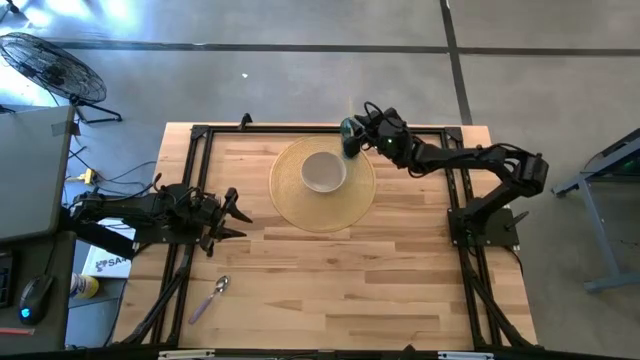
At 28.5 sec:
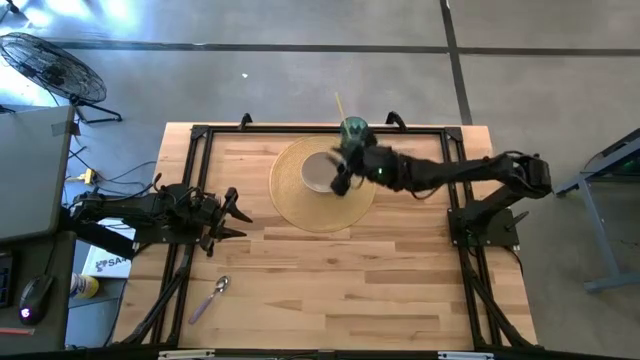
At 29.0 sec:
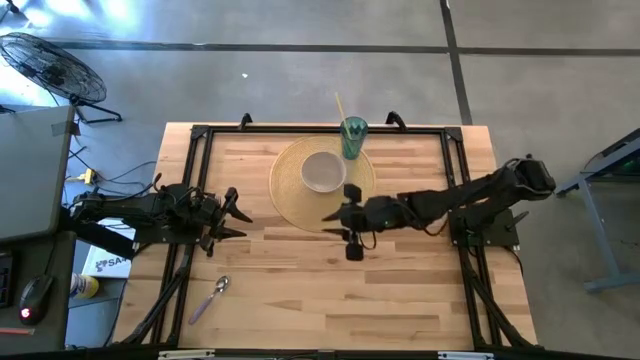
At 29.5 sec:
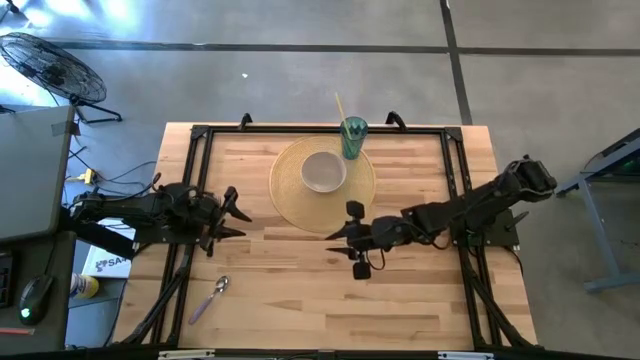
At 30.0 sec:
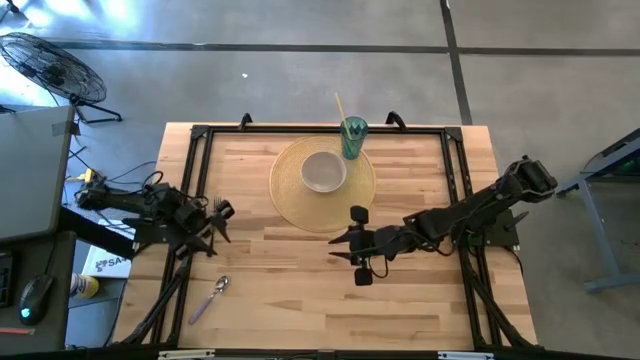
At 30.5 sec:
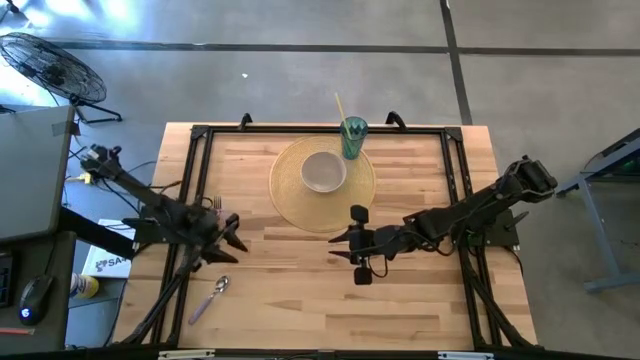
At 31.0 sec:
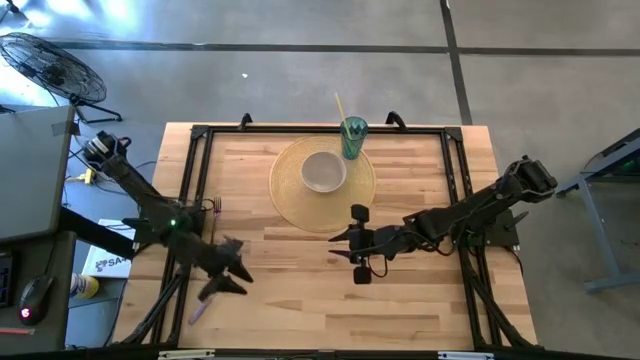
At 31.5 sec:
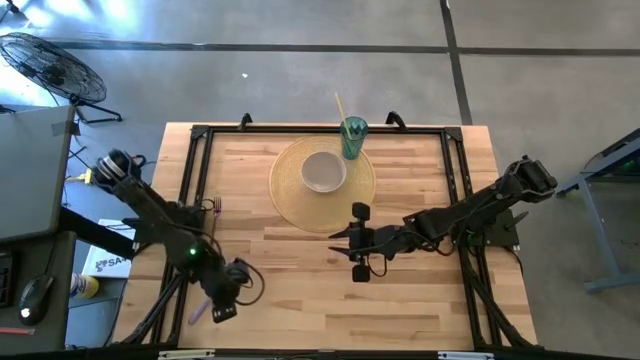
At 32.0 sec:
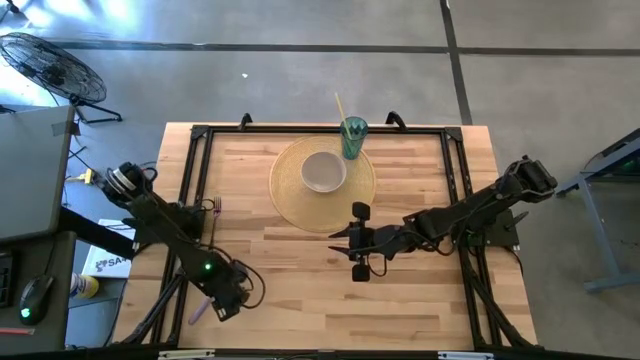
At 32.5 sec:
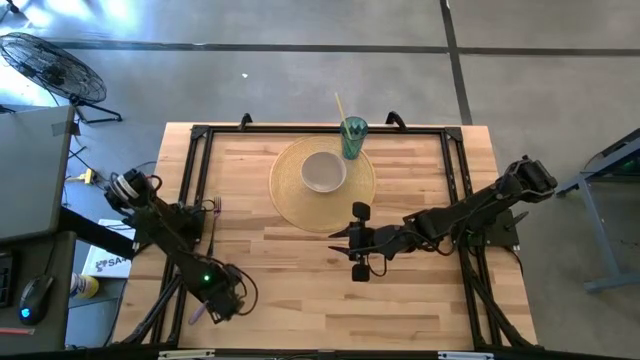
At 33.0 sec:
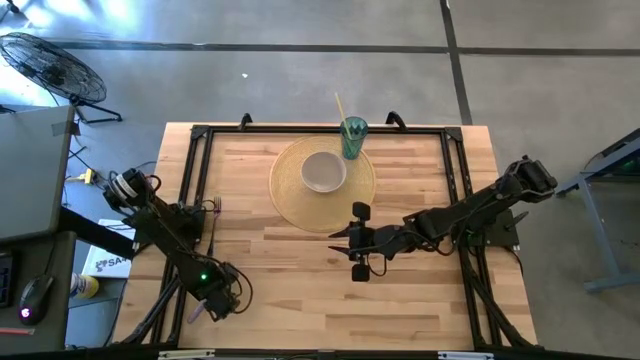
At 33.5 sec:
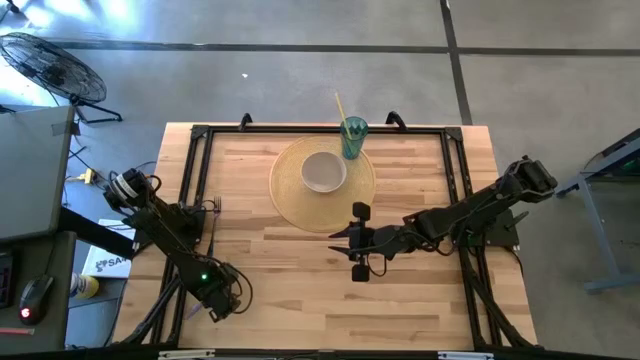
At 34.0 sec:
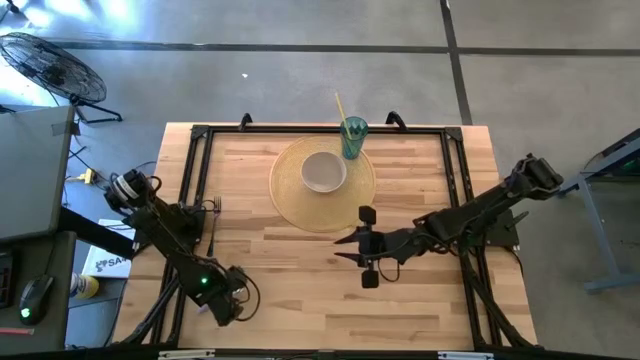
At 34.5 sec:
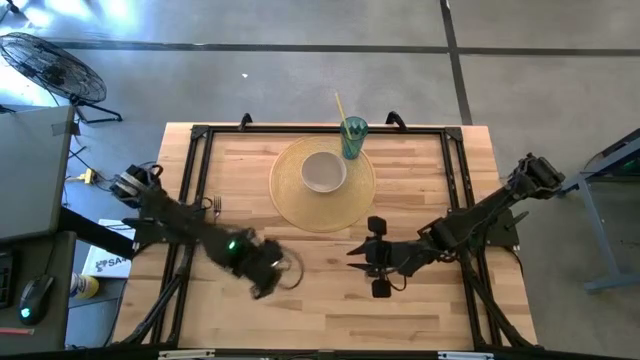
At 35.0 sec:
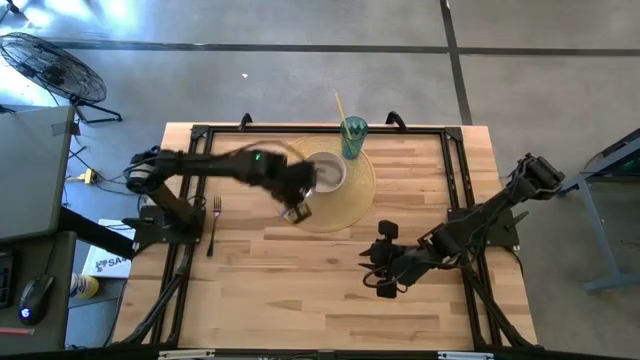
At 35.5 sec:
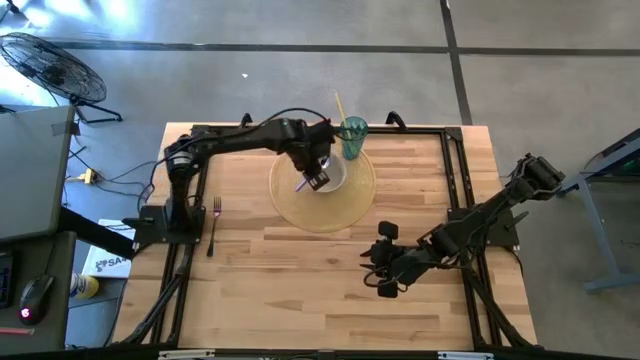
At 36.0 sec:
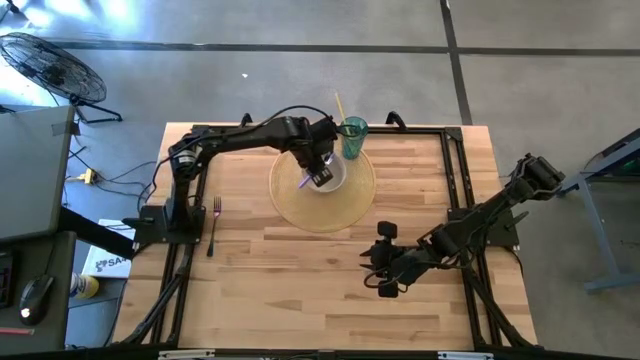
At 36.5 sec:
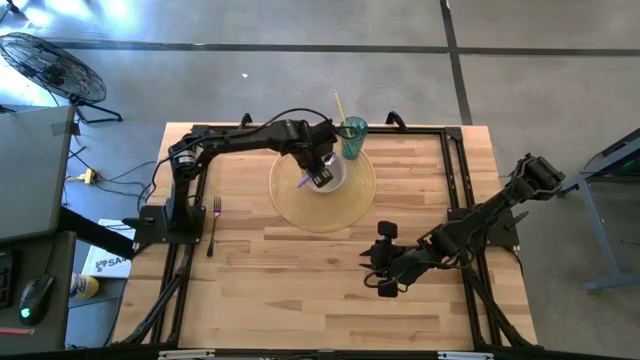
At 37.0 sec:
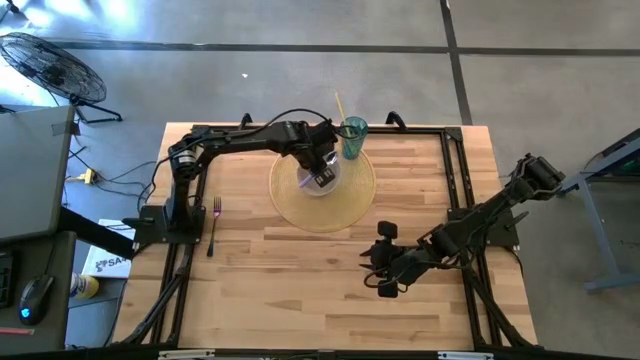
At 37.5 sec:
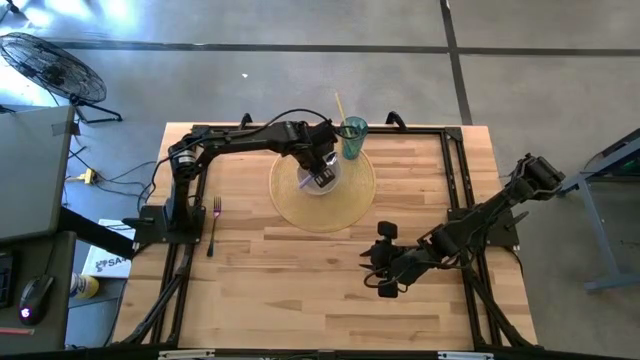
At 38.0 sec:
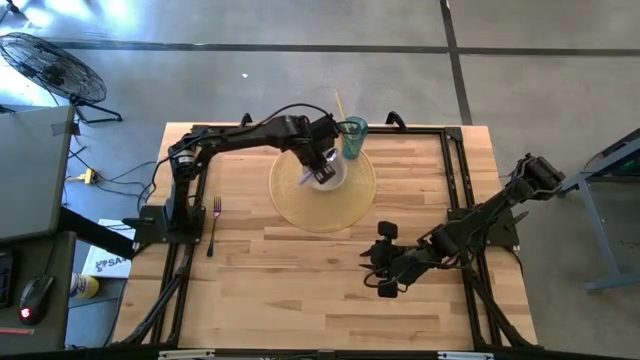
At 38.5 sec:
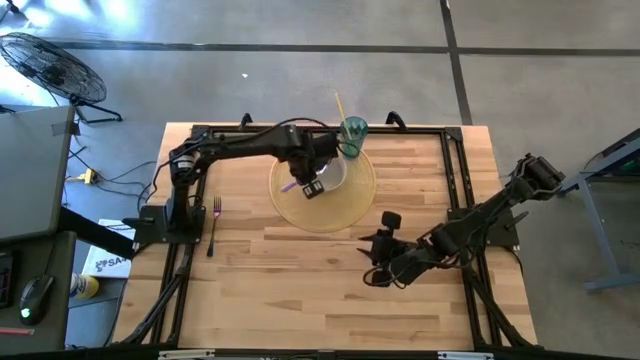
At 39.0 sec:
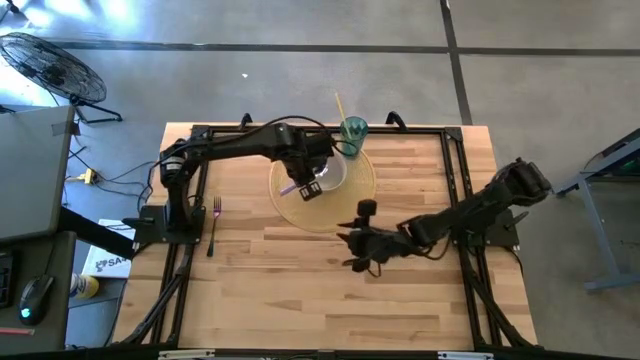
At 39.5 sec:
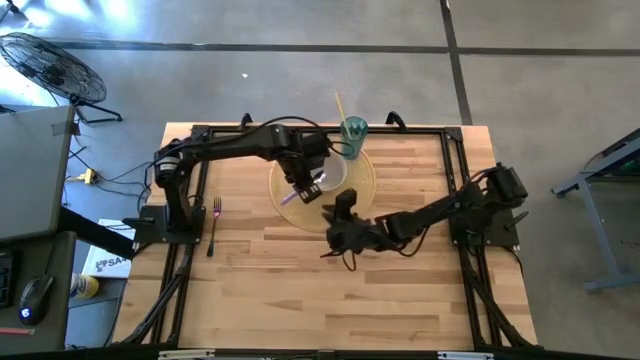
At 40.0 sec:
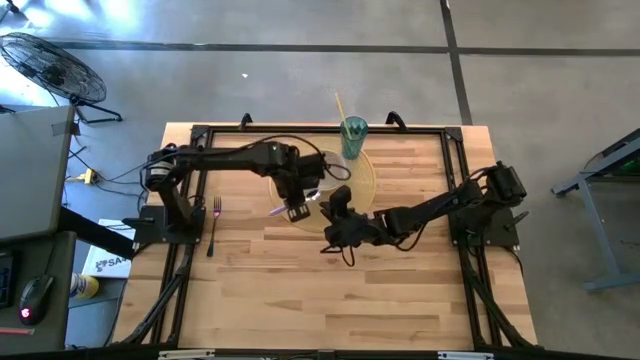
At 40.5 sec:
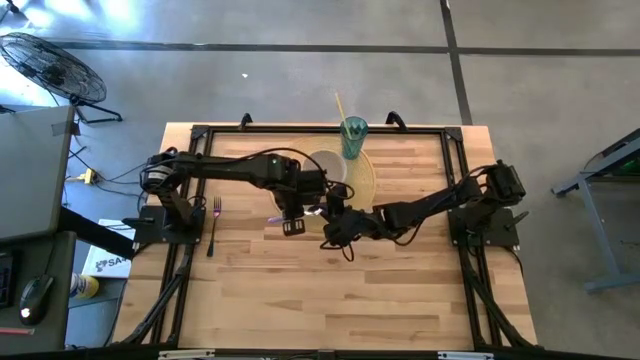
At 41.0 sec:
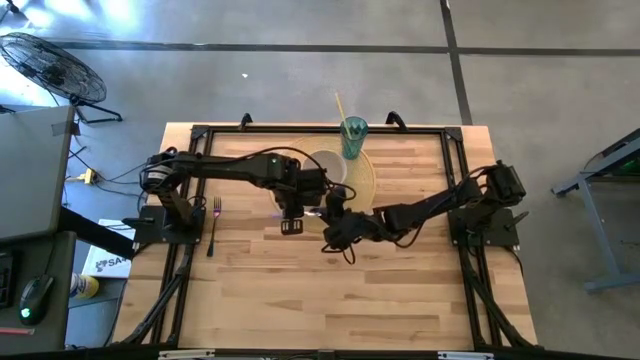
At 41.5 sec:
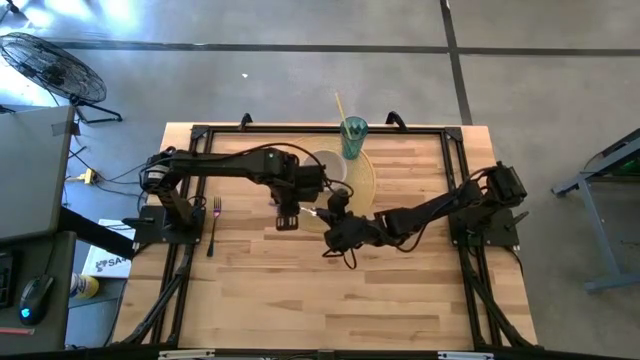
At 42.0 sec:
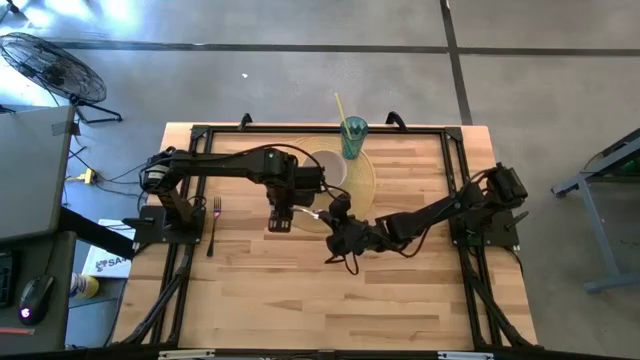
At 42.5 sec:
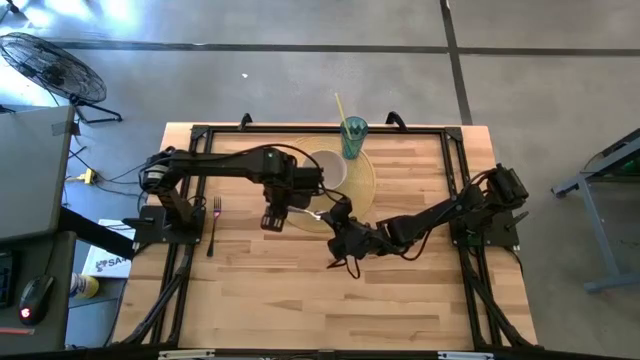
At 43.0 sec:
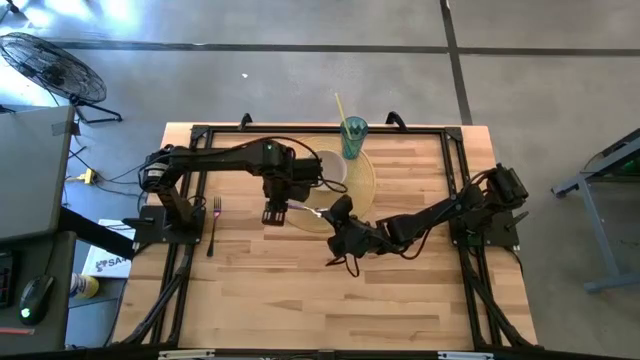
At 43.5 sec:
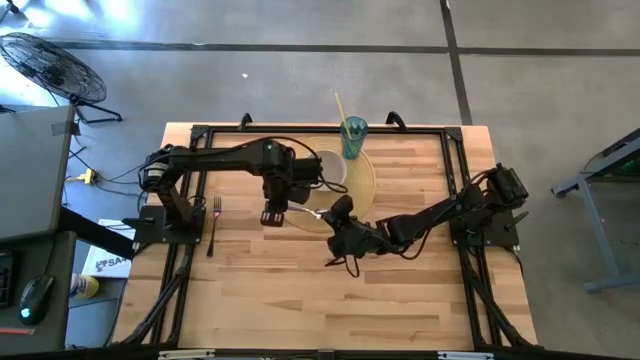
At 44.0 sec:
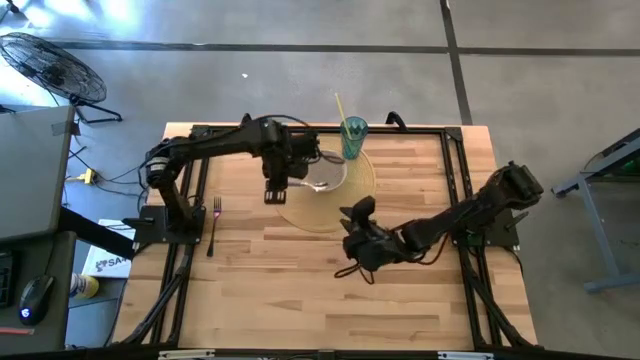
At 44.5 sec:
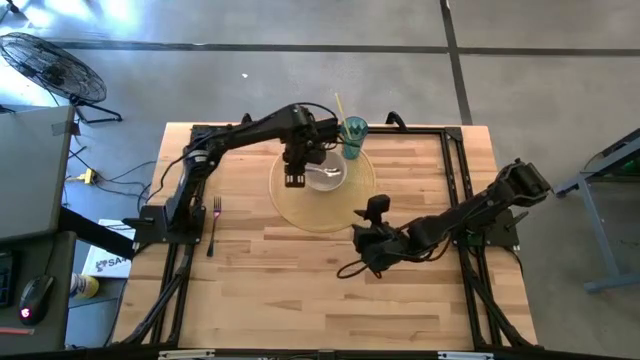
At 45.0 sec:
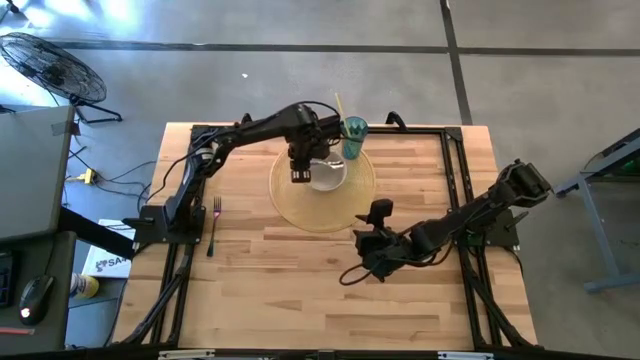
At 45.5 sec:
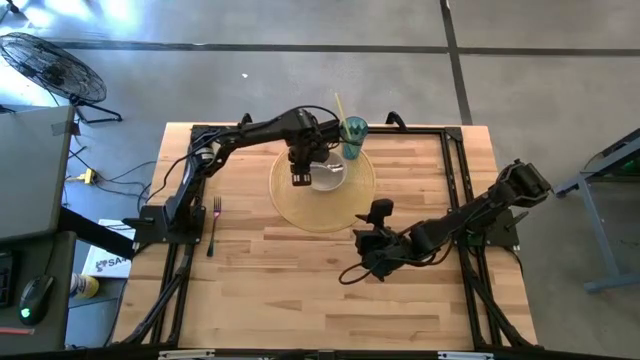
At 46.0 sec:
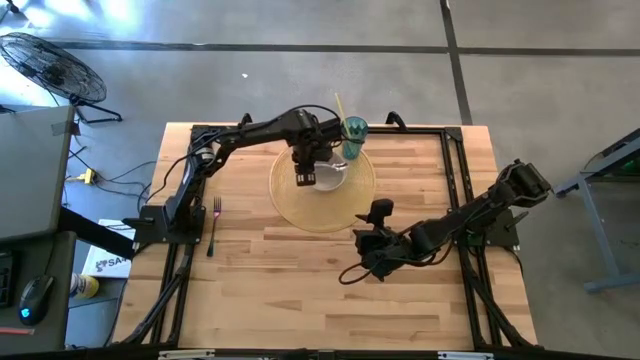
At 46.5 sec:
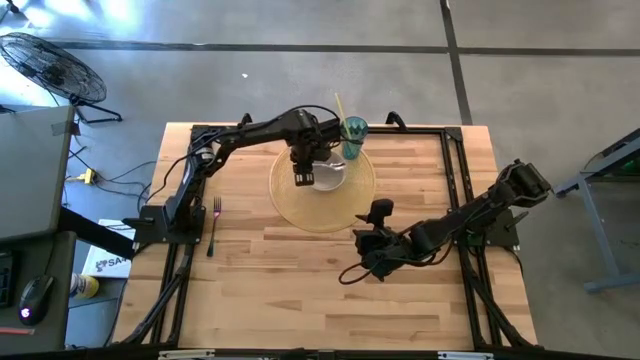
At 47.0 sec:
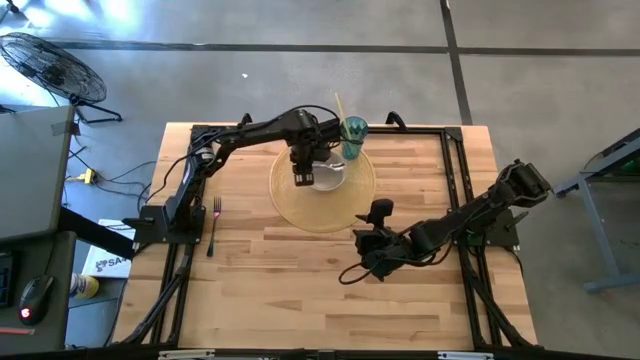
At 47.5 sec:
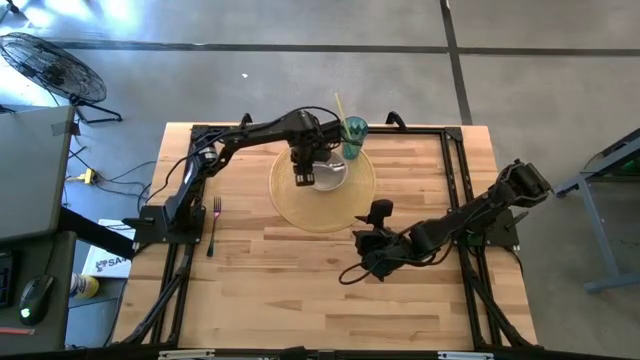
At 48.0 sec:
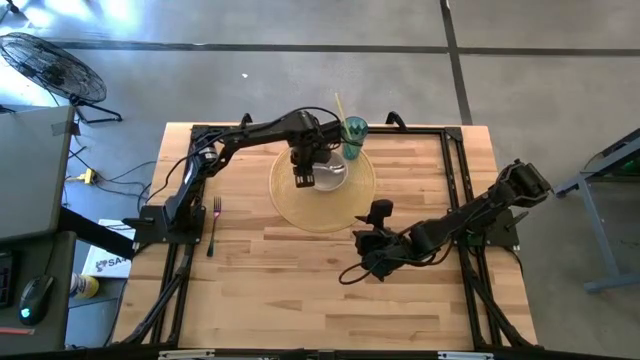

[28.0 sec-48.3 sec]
Task: Pick & Place Utensil
Put the purple spoon into the white bowl on the brown mat

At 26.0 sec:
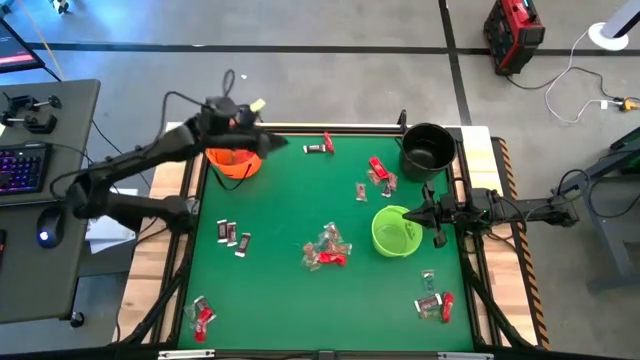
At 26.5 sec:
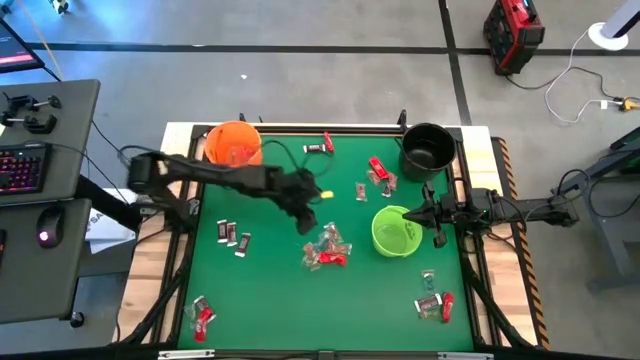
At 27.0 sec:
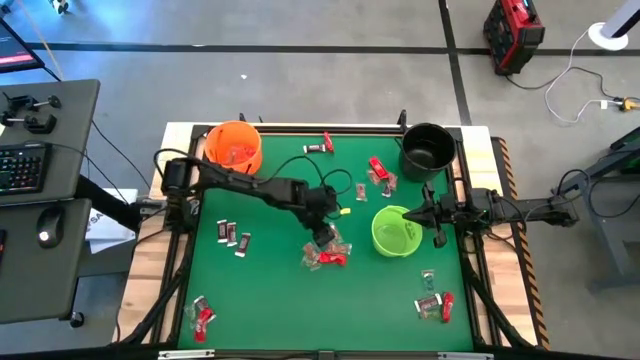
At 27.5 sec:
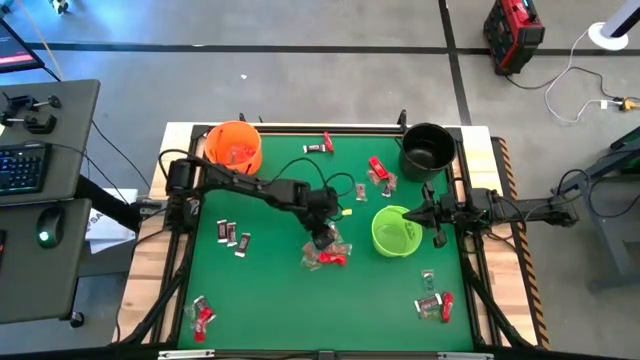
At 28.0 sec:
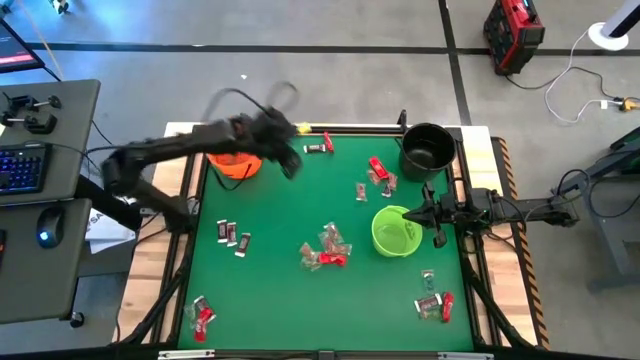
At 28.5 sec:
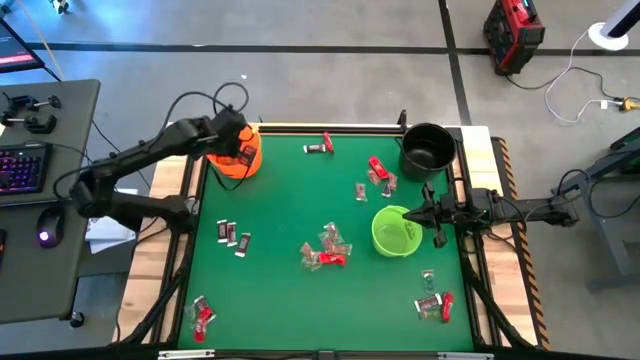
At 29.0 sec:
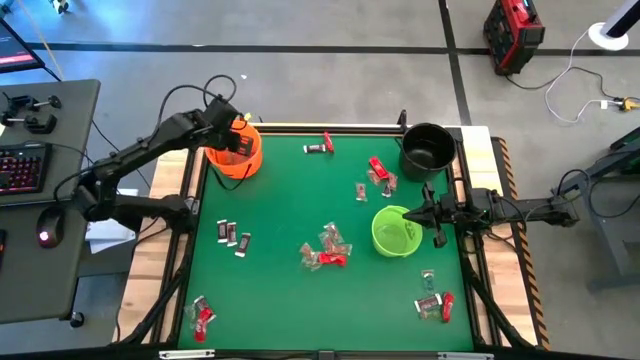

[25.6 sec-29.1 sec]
Task: Sort candy by brand, put in halloween buckets
Put the blue gummy into the orange bucket
